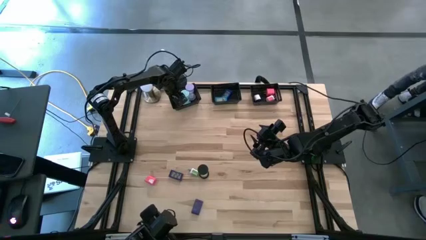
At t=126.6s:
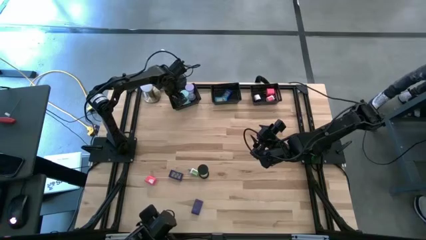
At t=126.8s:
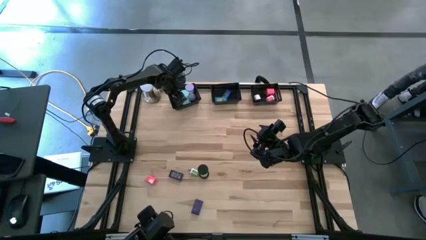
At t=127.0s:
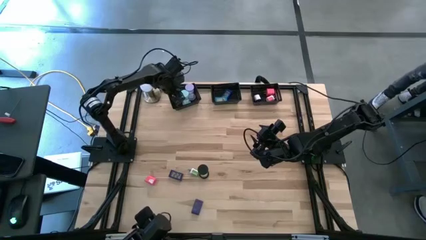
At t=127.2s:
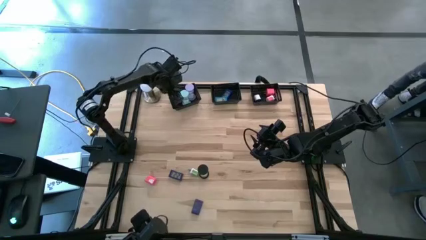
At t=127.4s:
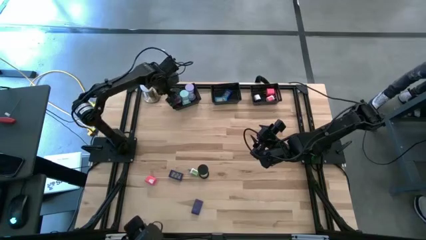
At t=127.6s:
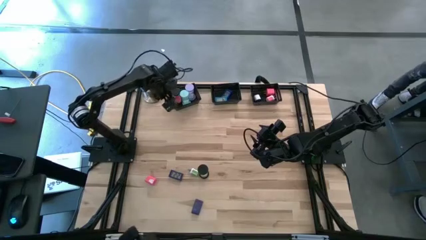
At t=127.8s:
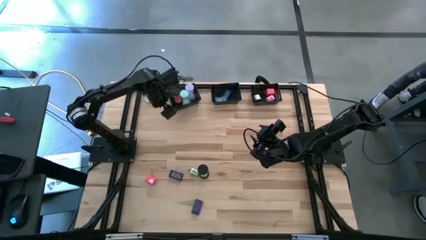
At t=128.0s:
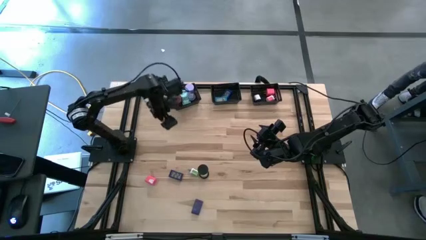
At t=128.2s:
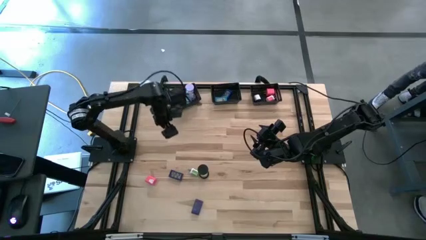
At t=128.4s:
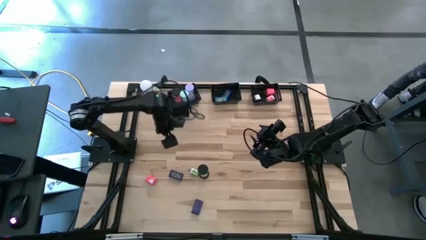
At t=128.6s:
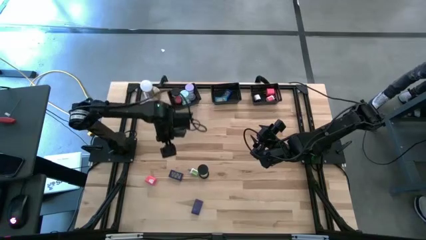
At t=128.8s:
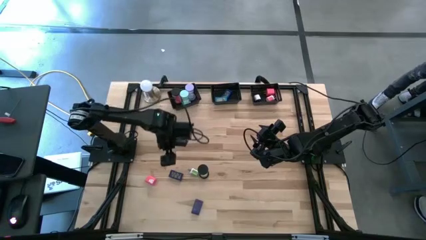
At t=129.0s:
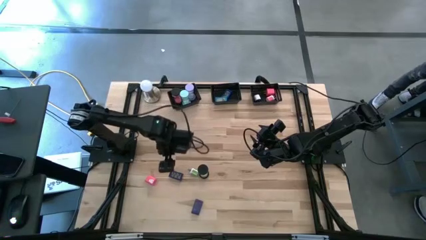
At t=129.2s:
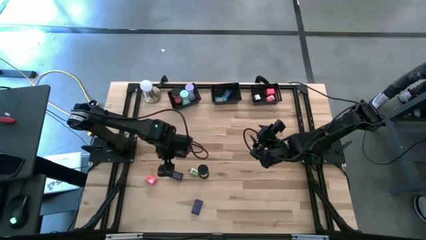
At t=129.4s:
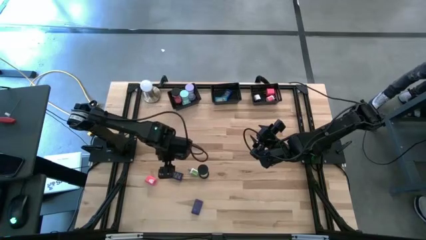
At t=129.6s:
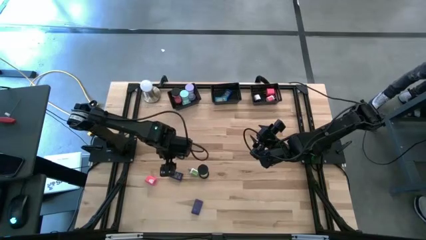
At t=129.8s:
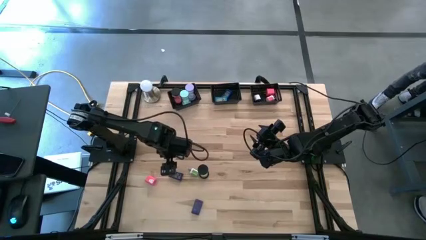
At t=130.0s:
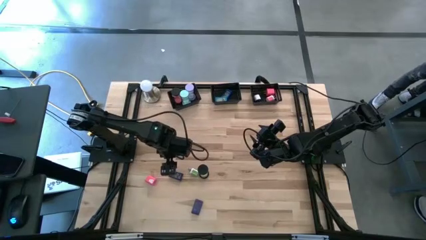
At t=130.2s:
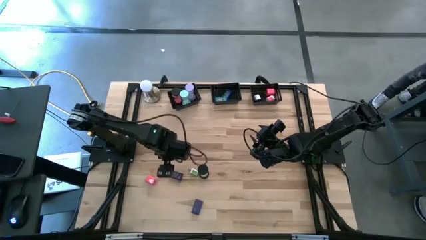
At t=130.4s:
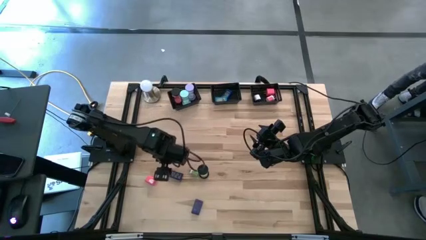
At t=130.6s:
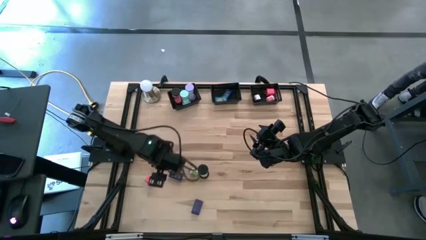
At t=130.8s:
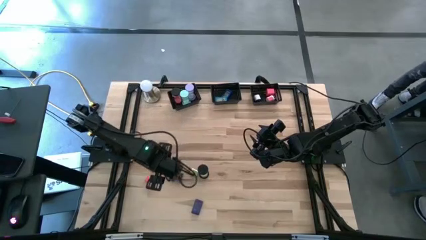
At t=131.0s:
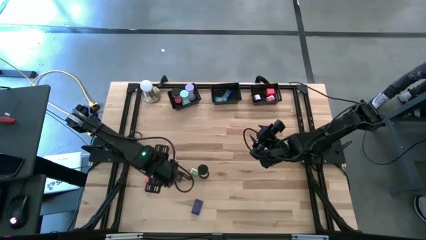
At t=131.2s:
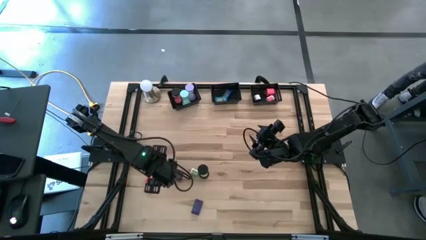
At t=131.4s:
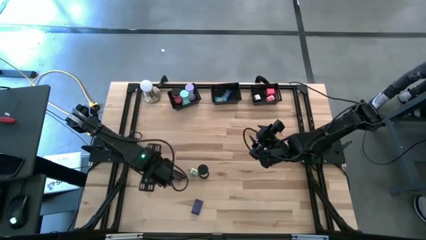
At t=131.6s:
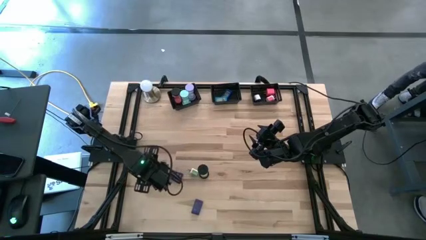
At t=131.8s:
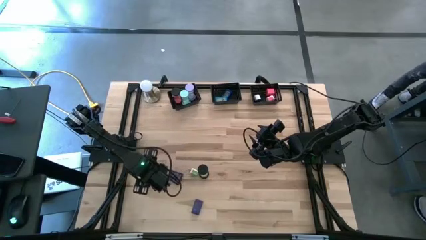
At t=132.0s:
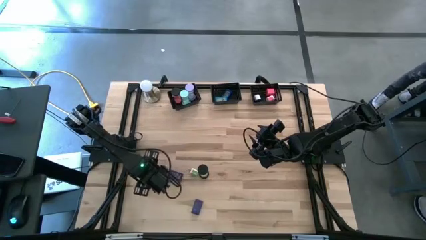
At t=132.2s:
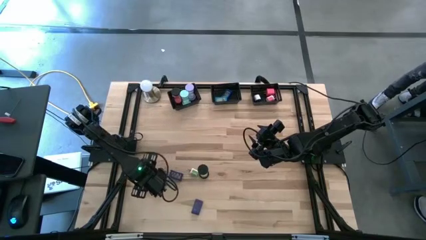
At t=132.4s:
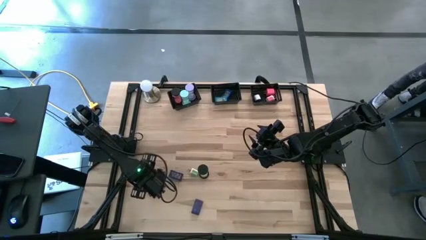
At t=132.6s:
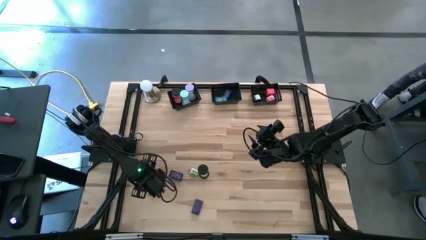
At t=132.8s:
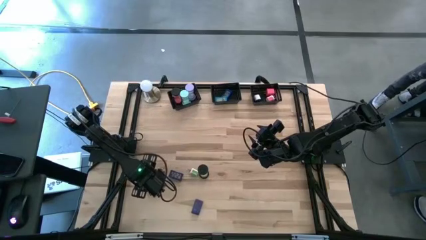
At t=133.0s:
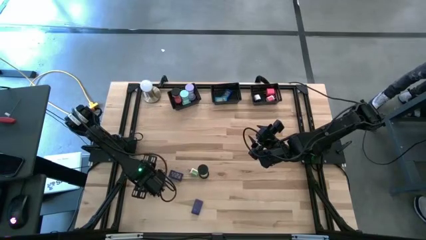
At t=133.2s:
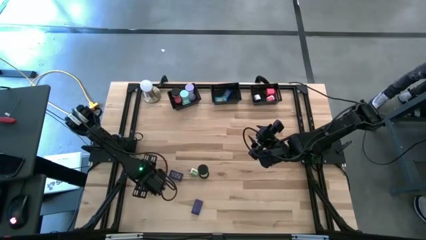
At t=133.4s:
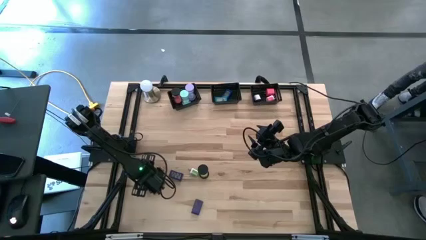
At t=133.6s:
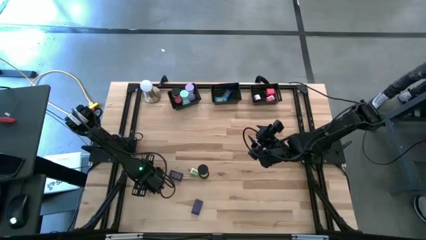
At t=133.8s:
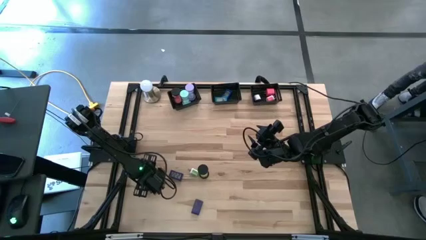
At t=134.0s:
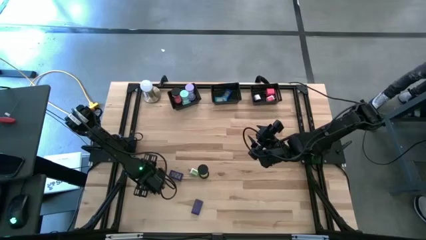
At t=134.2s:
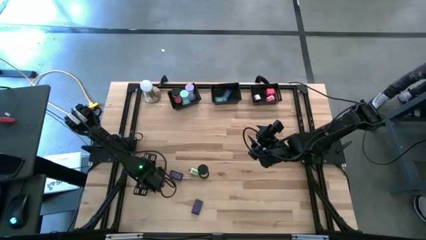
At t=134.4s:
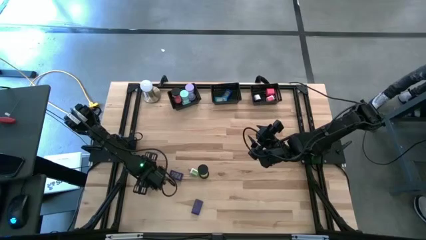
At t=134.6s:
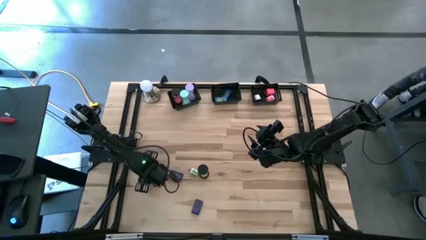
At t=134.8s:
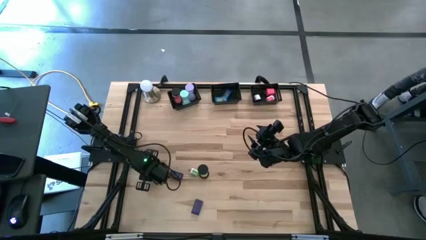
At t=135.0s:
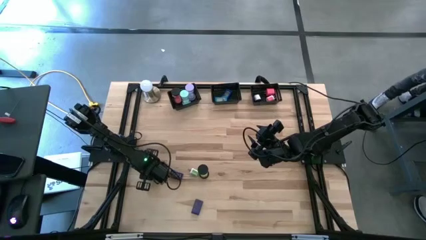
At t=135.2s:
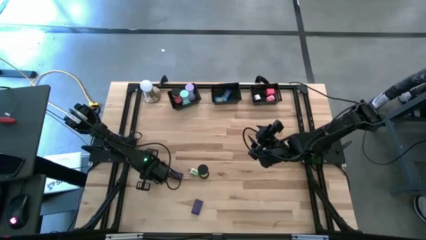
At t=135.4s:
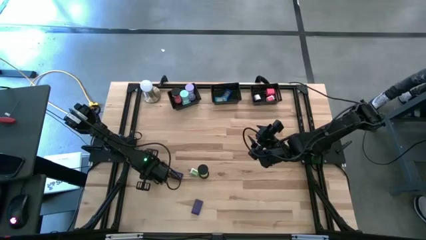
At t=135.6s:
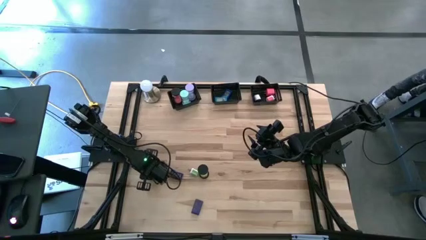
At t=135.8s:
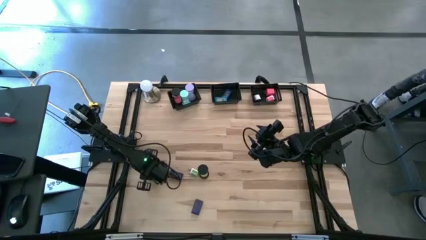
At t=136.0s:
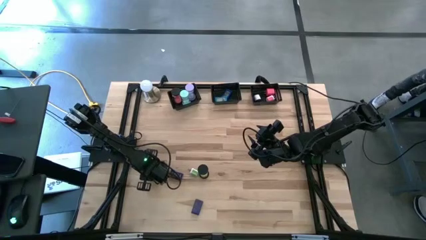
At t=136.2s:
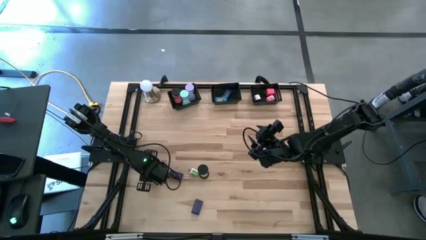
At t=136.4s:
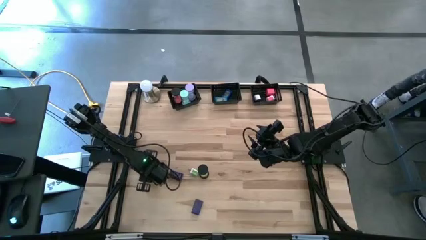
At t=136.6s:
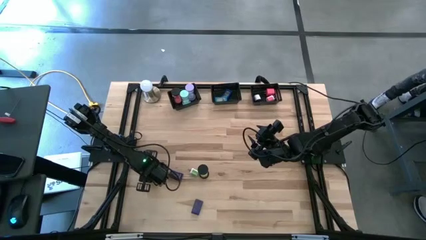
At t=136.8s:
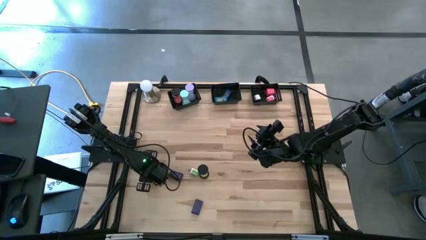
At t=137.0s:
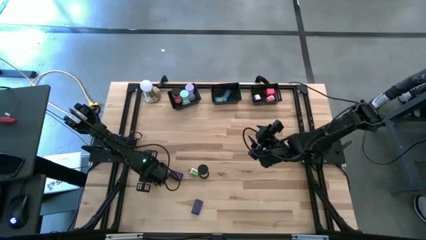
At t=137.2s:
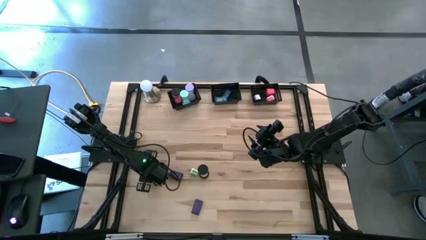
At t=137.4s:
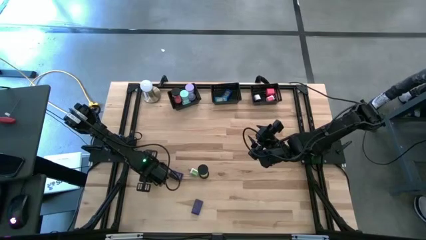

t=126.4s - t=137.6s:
Task: Pick & Place Office items
Put the pink charger adapter into the right black bin
